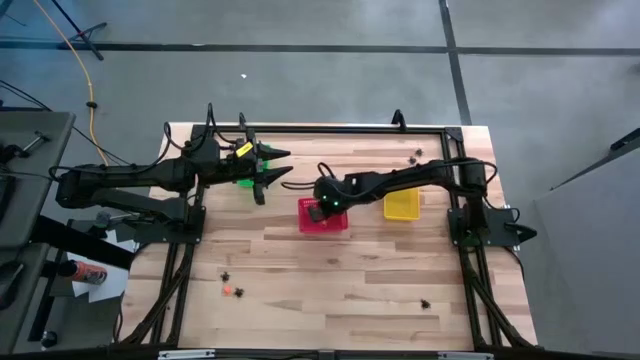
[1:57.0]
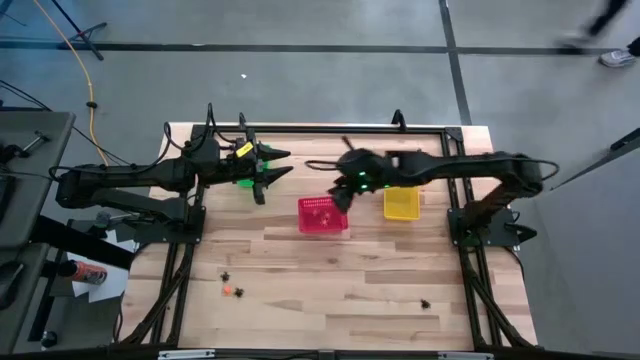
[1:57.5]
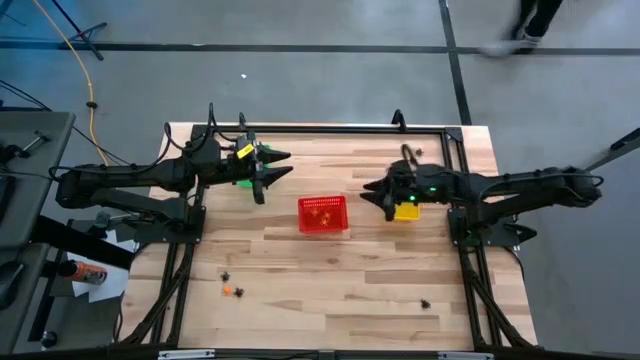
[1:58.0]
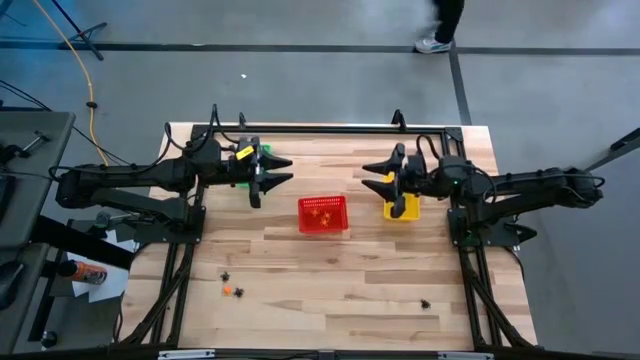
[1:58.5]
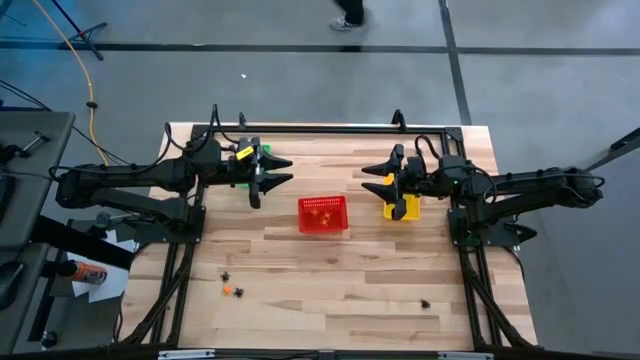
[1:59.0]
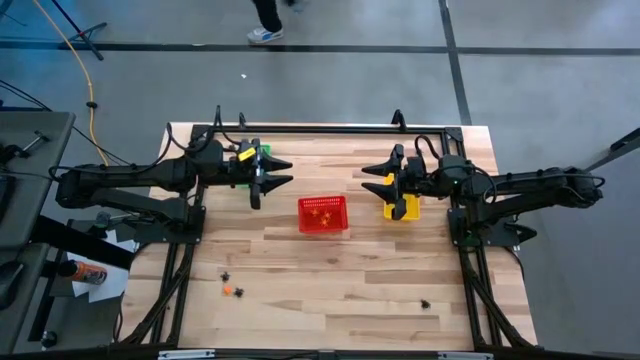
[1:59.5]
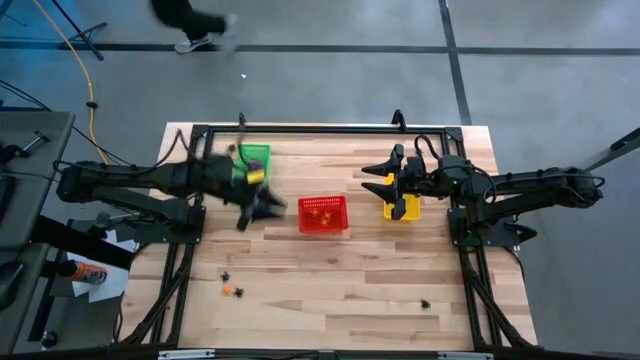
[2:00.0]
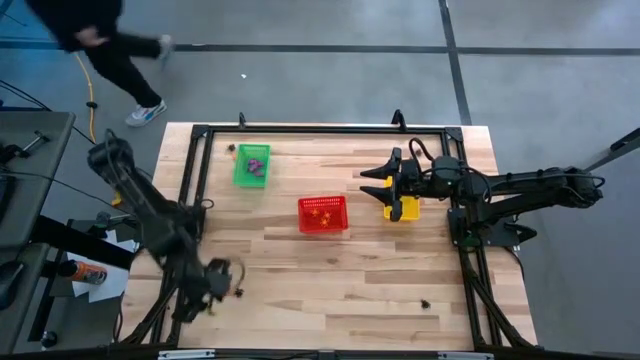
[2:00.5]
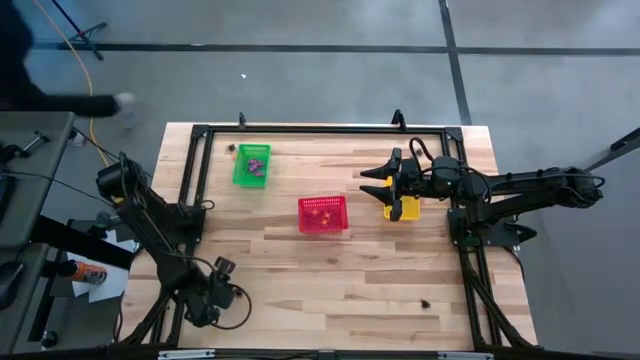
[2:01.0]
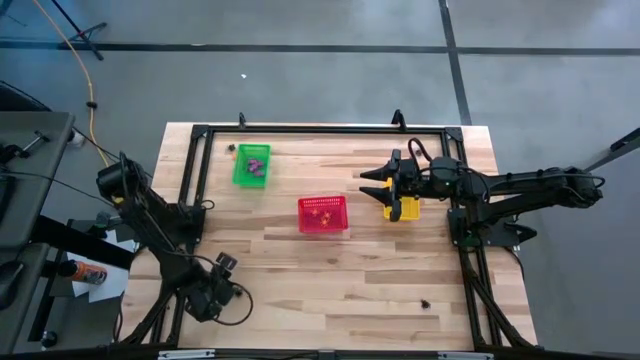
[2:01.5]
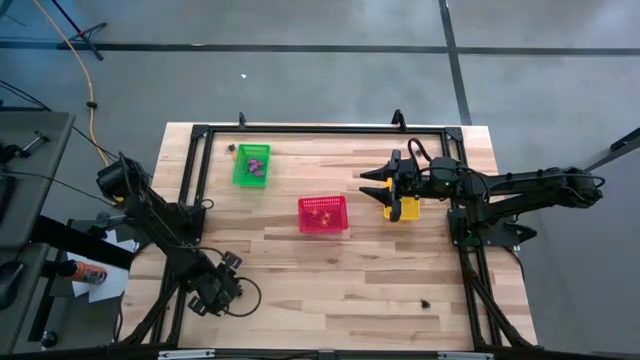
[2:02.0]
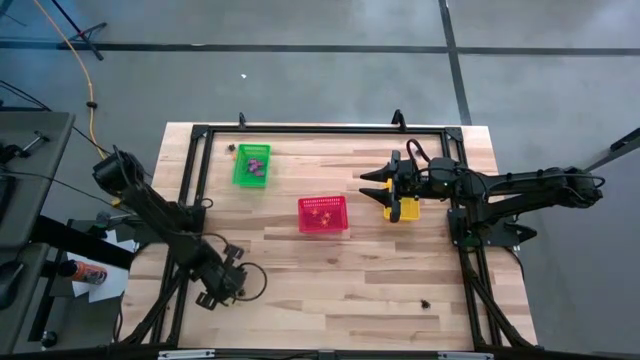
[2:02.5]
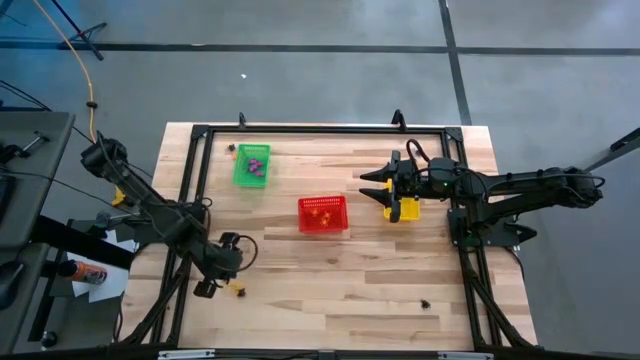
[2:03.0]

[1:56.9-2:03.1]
Task: Sort Halloween decoration
Put the orange spider toy into the red bin

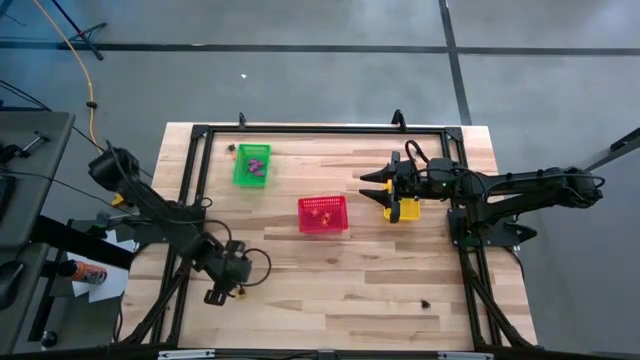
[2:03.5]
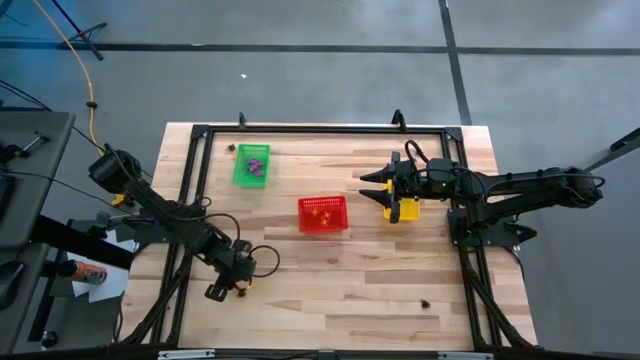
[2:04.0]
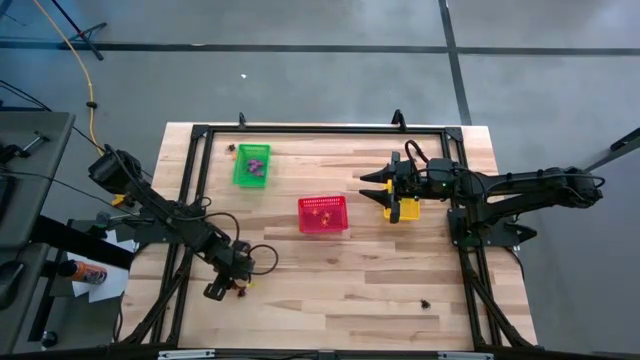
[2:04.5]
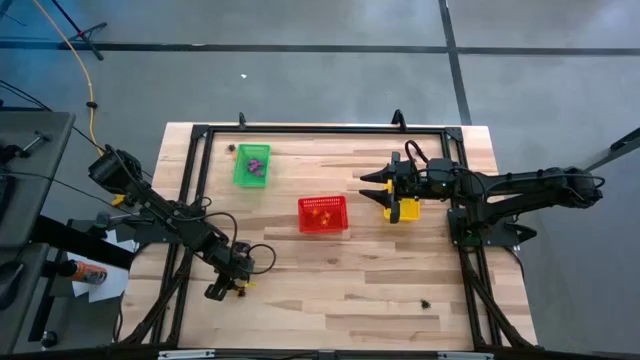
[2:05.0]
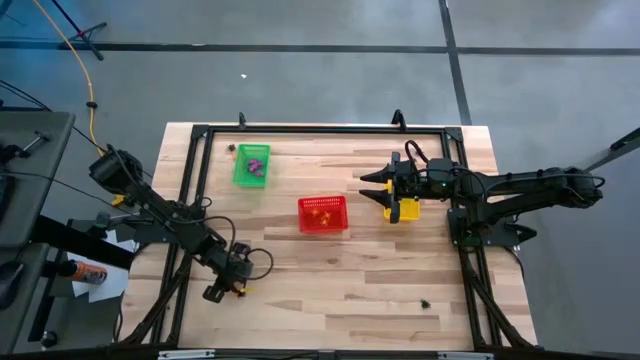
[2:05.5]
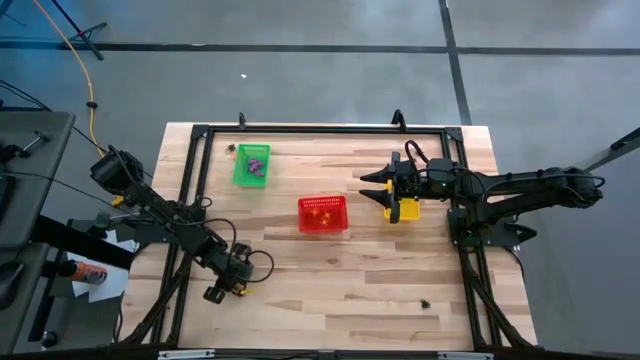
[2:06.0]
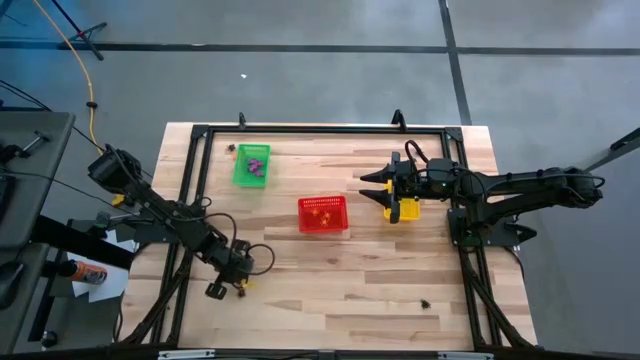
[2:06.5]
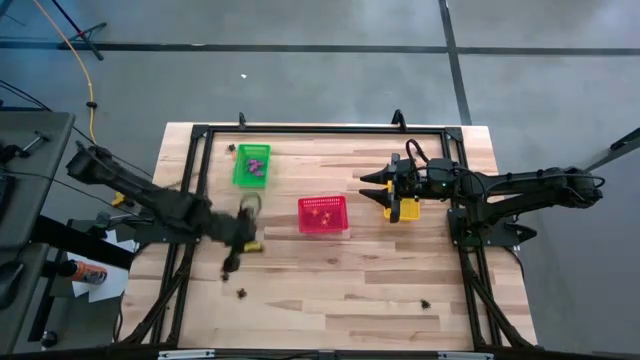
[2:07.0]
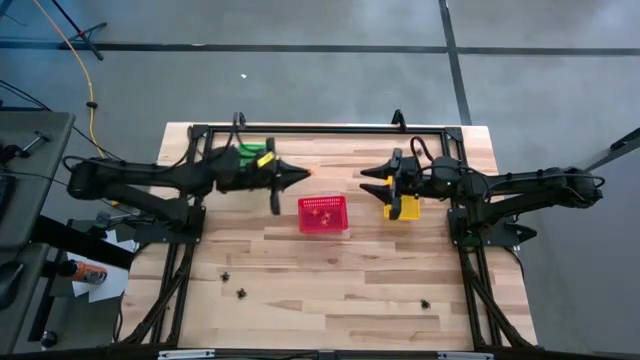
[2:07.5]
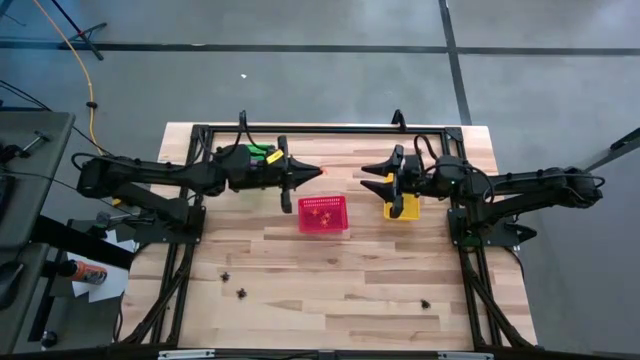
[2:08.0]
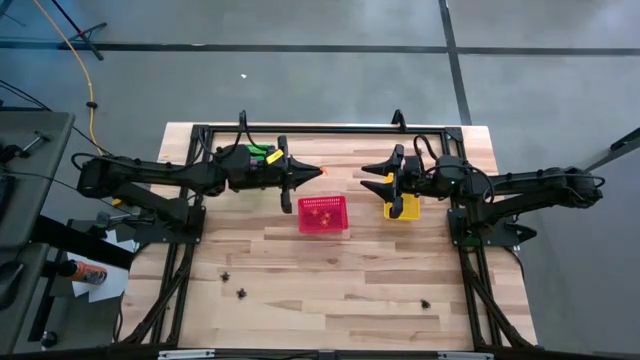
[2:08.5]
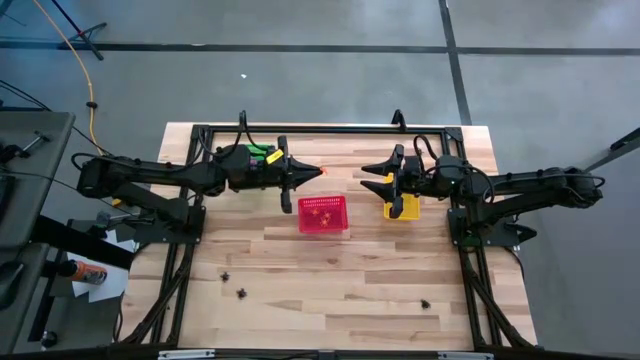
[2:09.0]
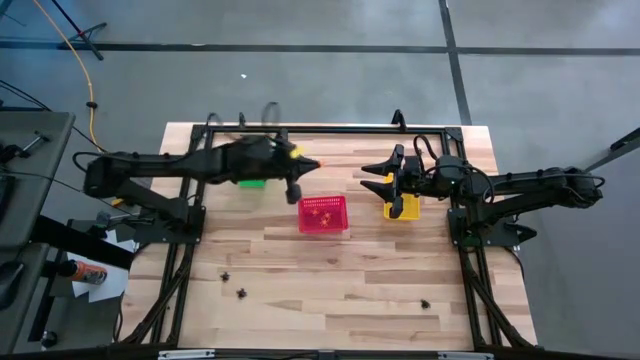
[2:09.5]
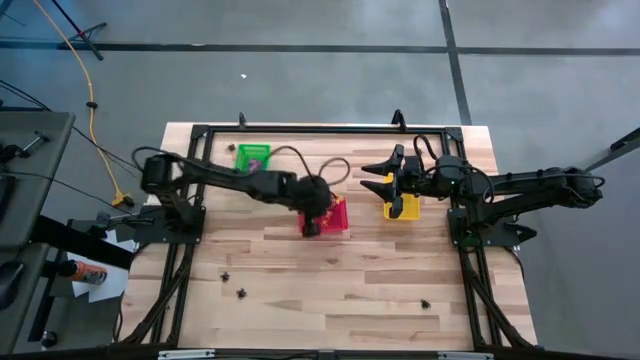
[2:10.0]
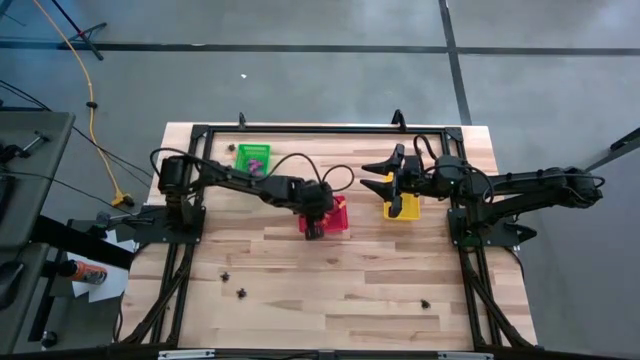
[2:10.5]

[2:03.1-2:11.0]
Put the orange spider toy into the red bin

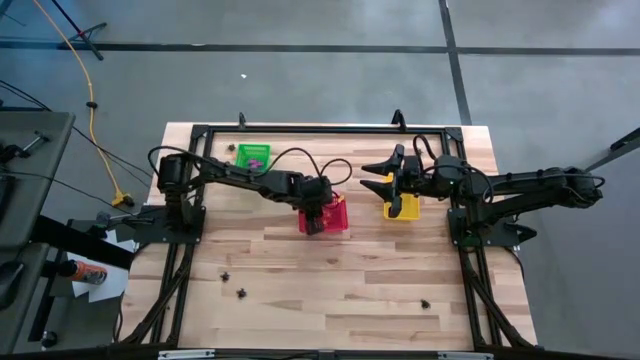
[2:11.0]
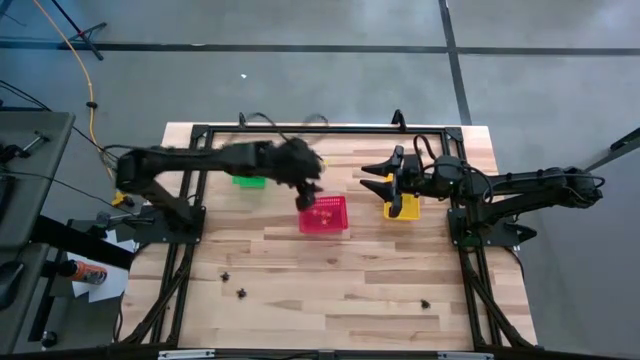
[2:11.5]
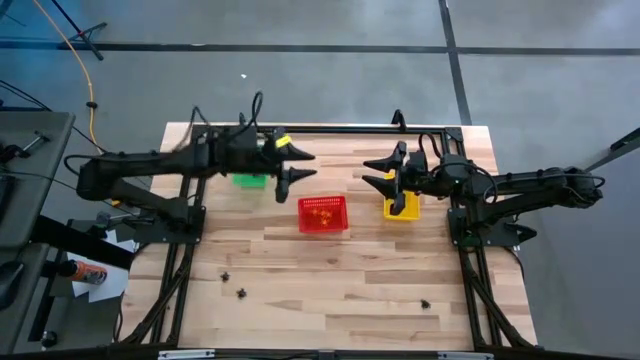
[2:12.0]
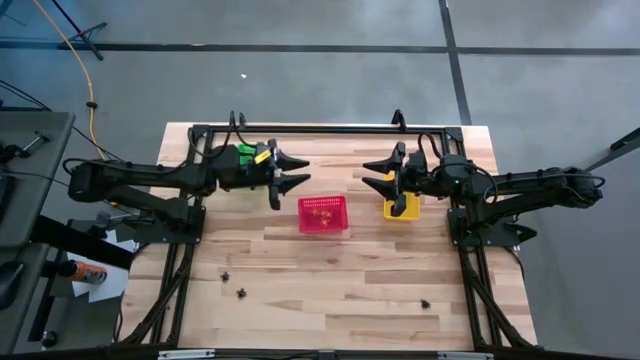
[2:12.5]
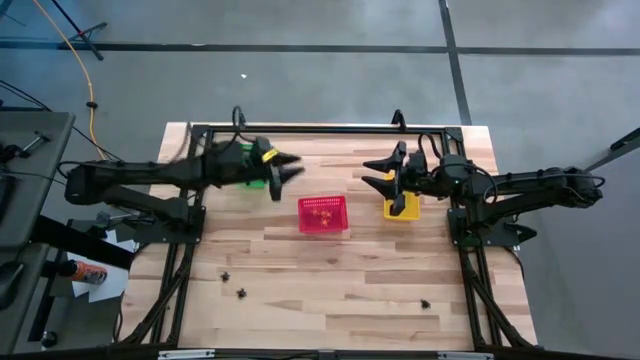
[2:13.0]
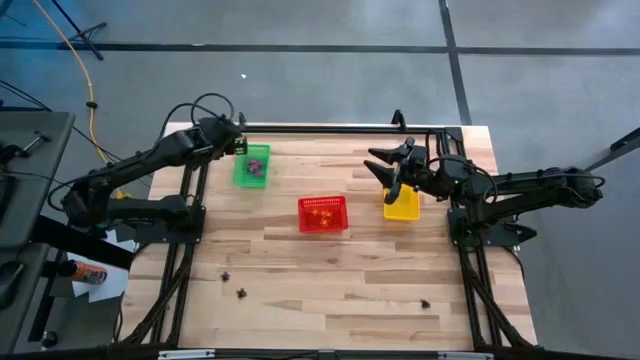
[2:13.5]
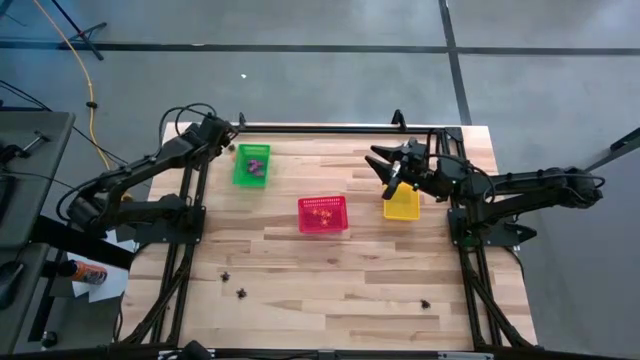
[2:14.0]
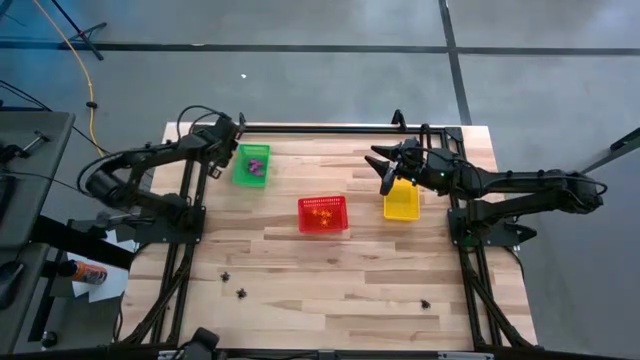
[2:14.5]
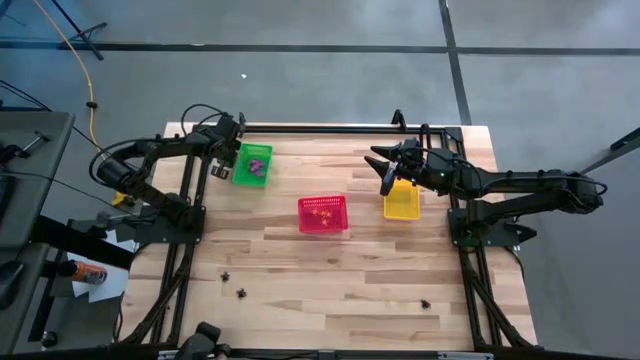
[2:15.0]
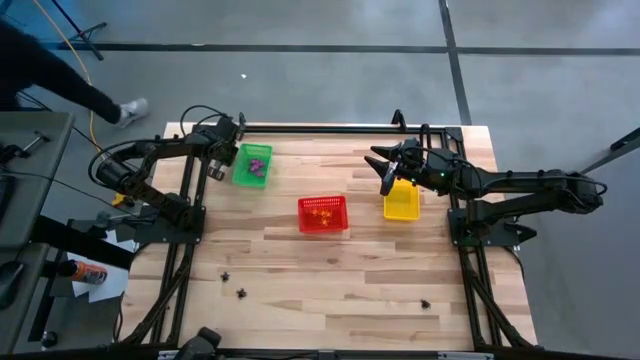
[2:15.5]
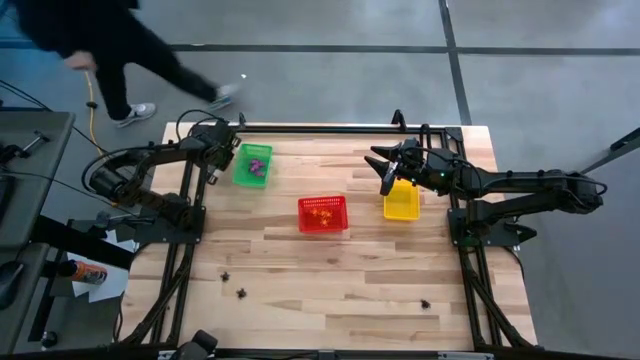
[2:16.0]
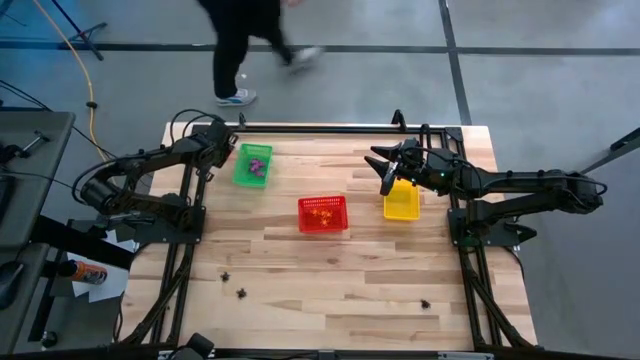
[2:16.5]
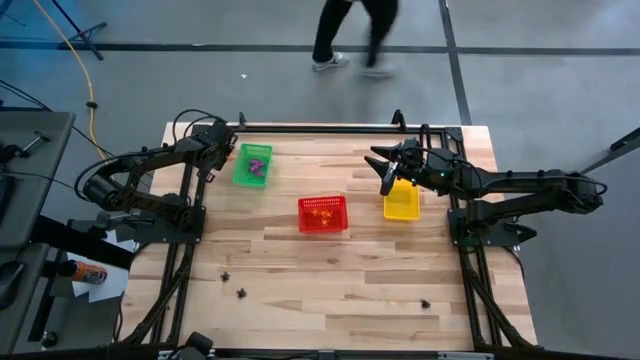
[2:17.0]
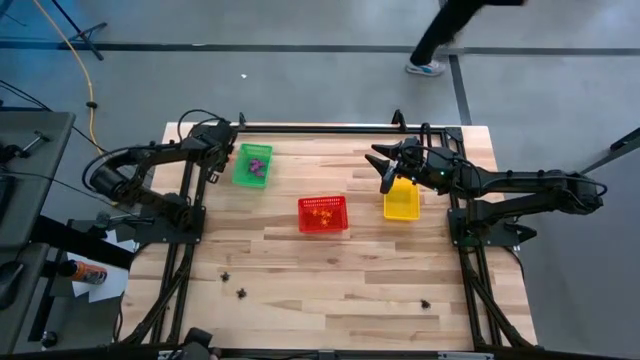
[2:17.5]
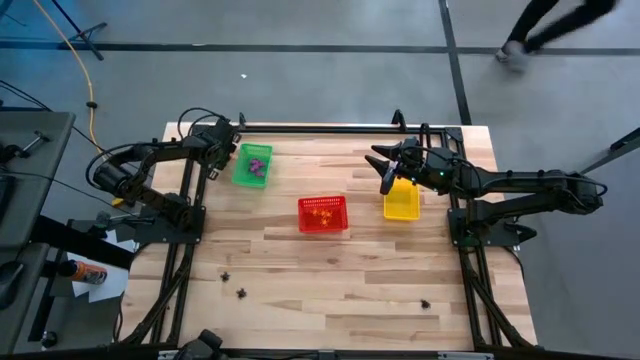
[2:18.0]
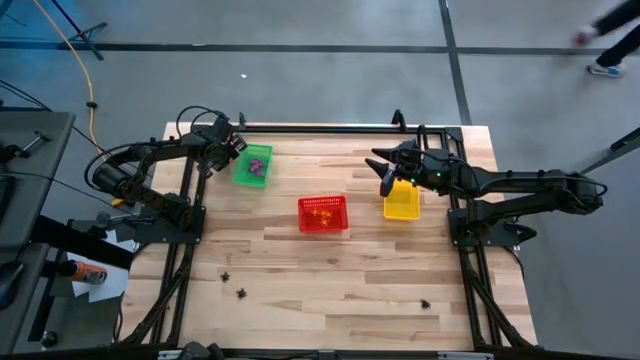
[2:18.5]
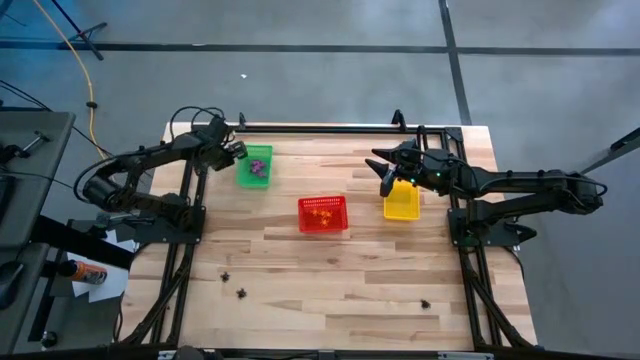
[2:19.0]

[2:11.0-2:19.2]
Put the orange spider toy into the red bin
